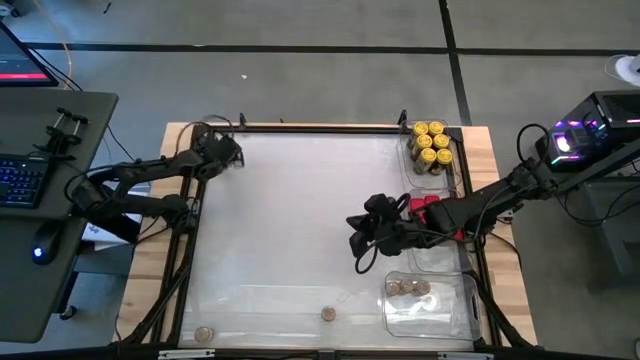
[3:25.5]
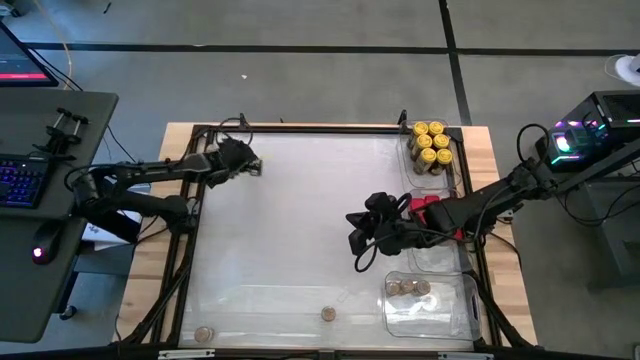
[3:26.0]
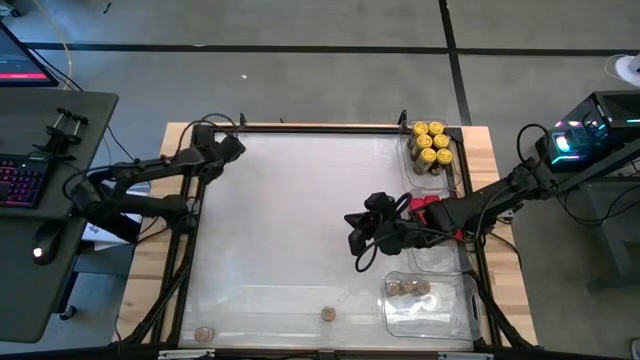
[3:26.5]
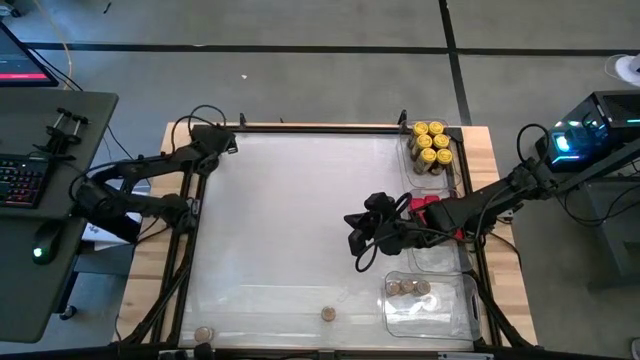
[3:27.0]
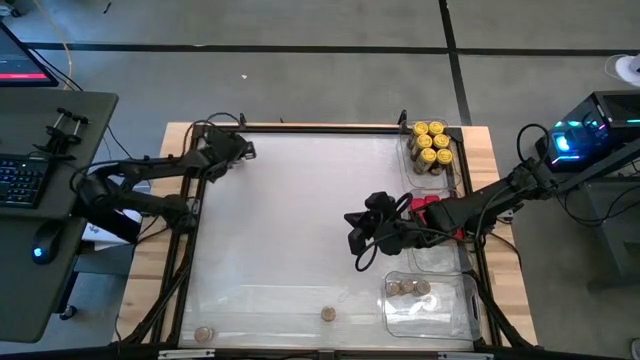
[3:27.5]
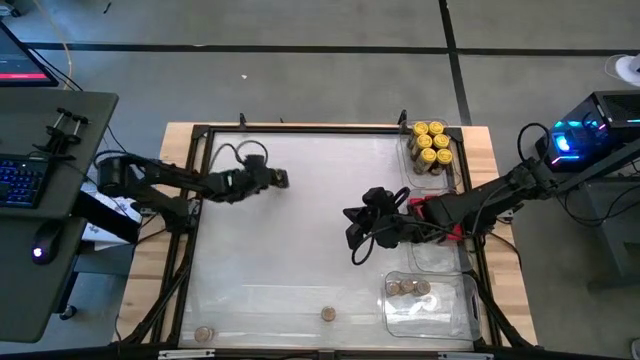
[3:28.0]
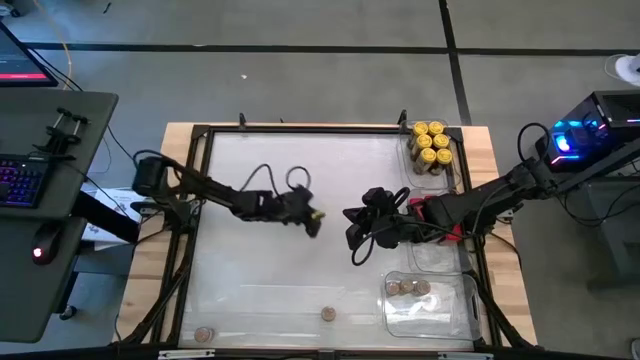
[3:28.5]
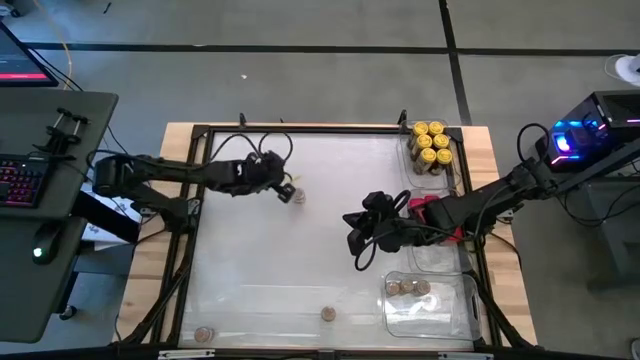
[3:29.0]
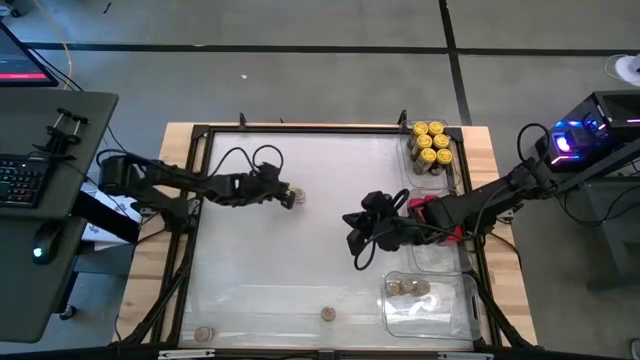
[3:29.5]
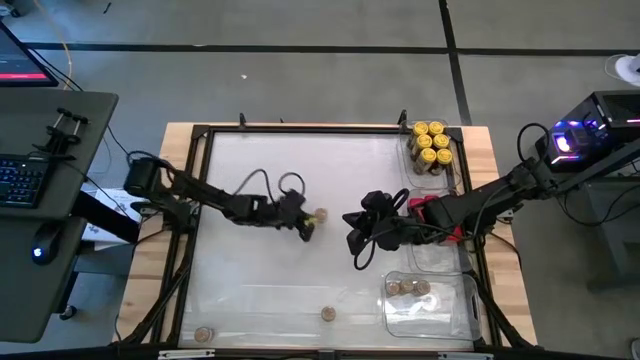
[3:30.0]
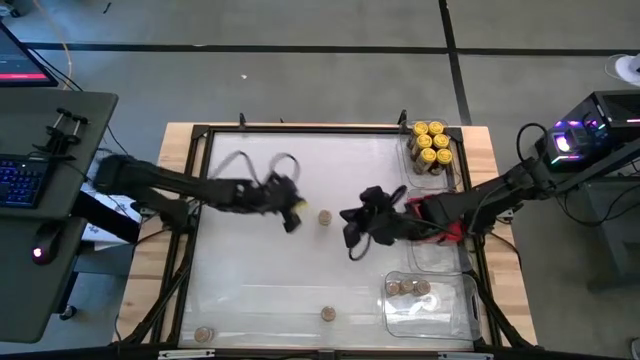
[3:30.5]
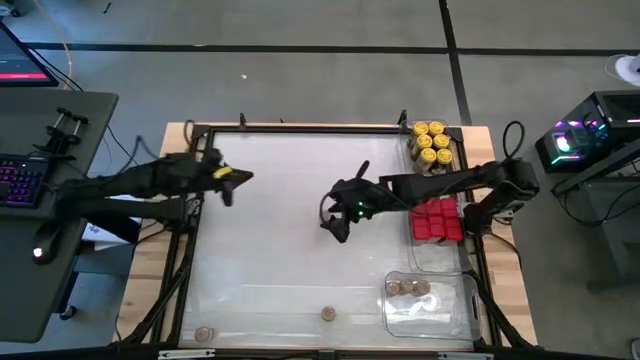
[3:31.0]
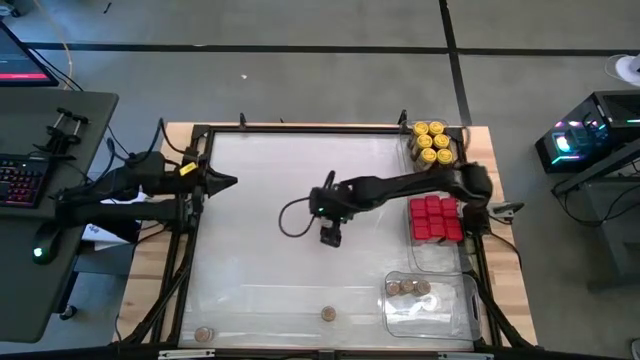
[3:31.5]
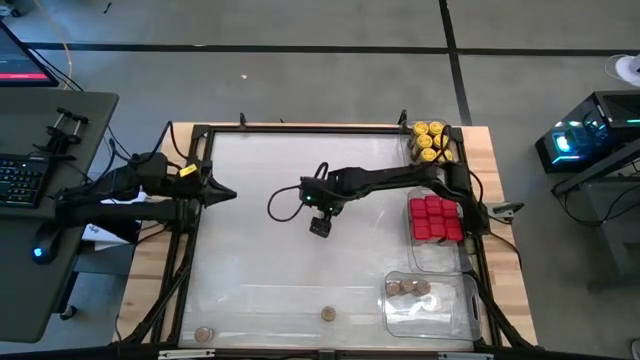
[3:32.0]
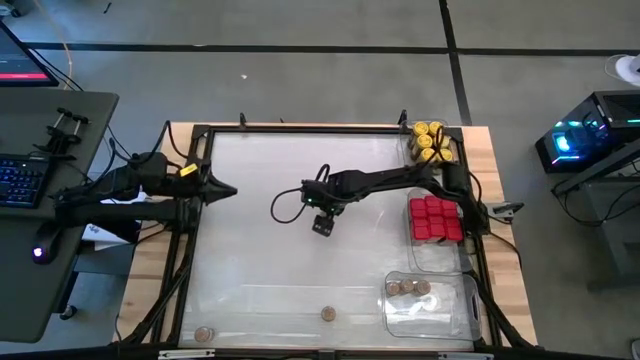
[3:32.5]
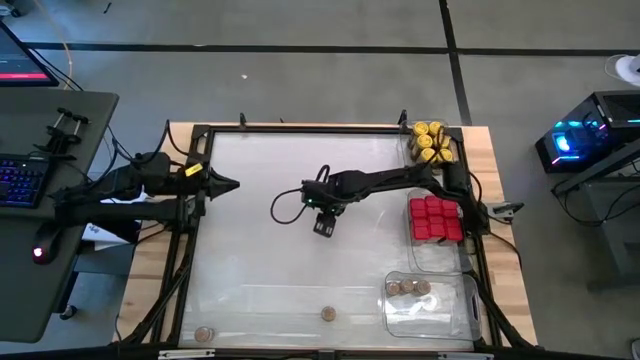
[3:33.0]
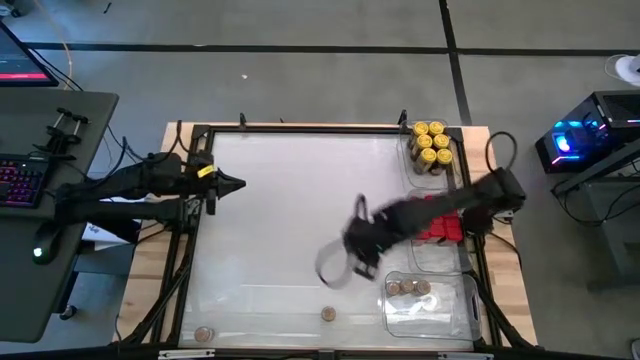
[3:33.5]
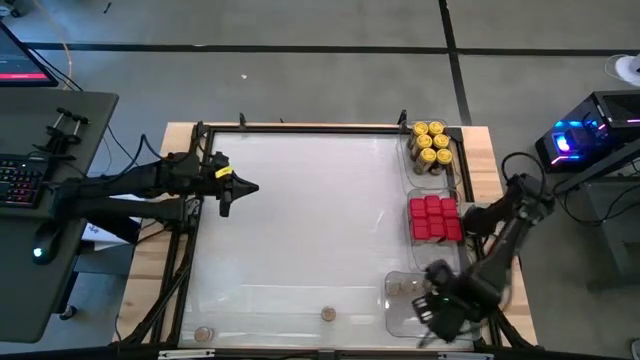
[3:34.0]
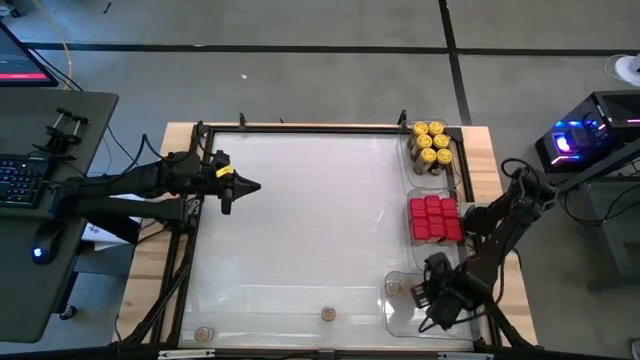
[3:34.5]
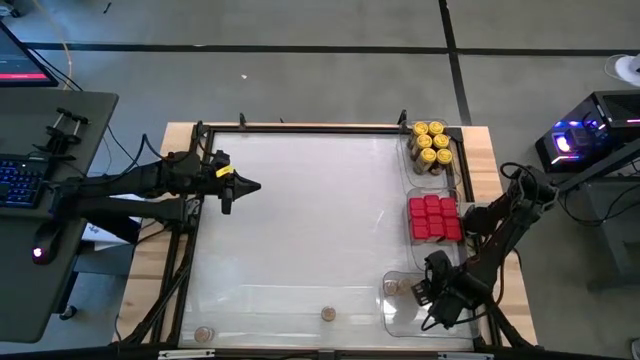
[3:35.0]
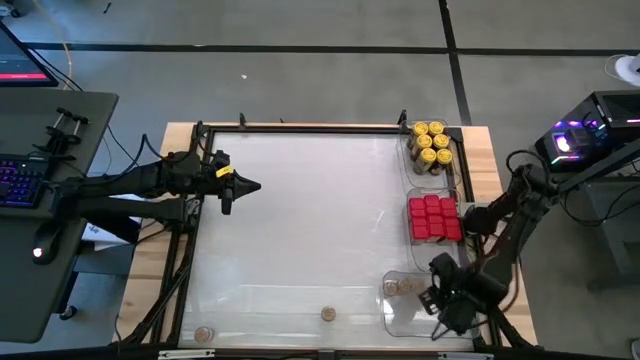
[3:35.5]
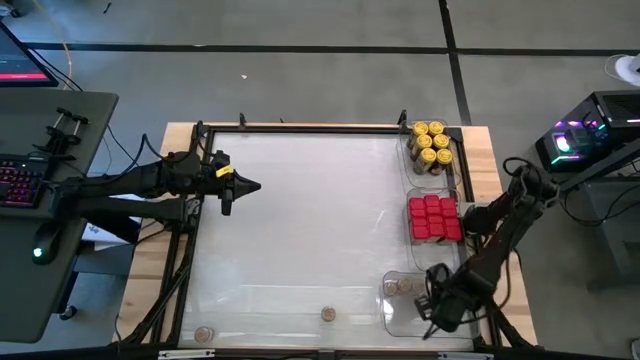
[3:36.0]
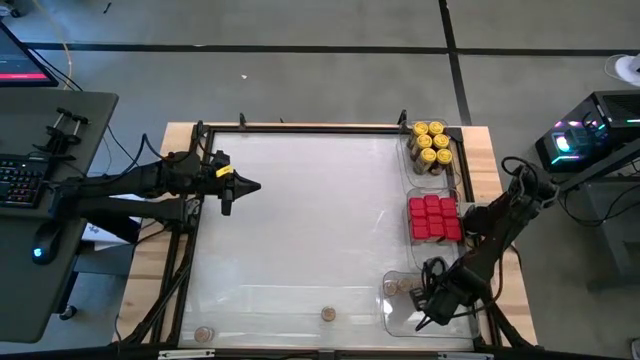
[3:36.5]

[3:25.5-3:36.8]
Task: Sort spices by type
Put the brown seasoning bottle into the bottom transparent bin

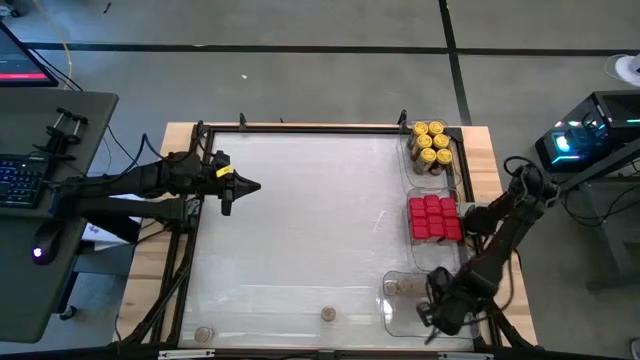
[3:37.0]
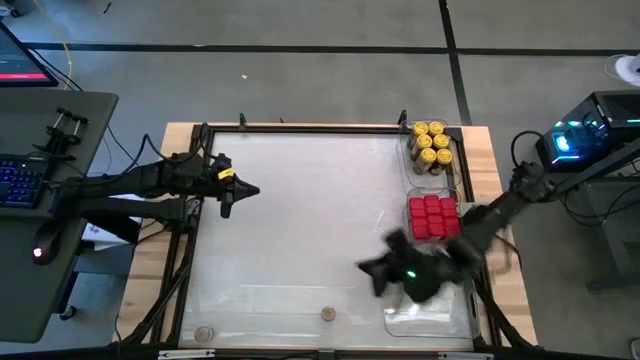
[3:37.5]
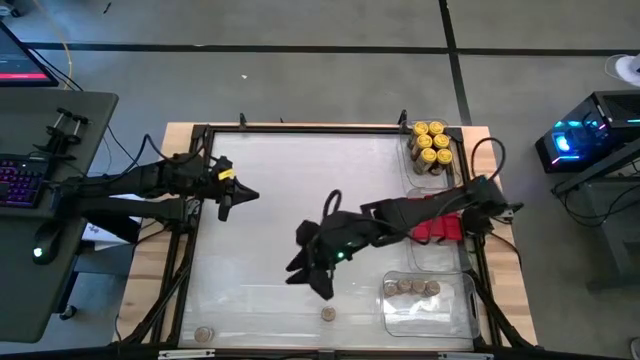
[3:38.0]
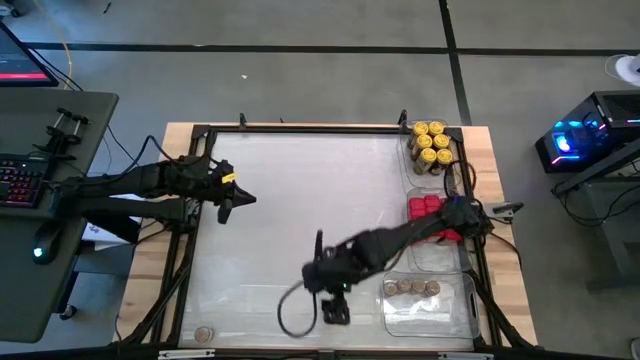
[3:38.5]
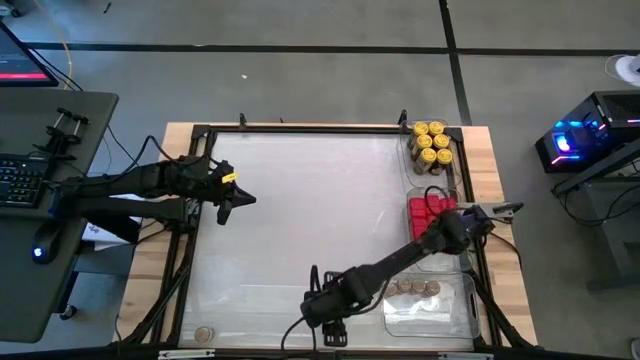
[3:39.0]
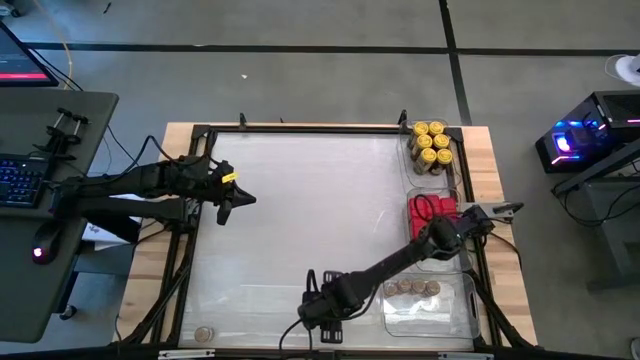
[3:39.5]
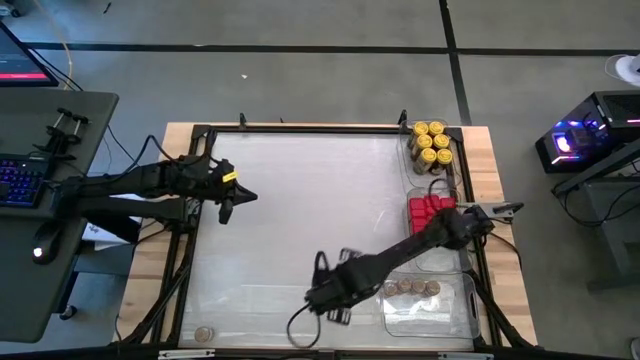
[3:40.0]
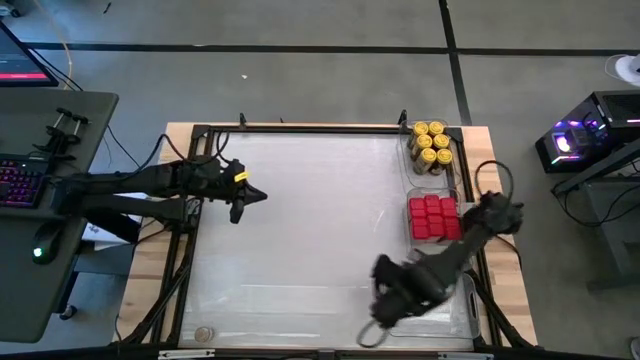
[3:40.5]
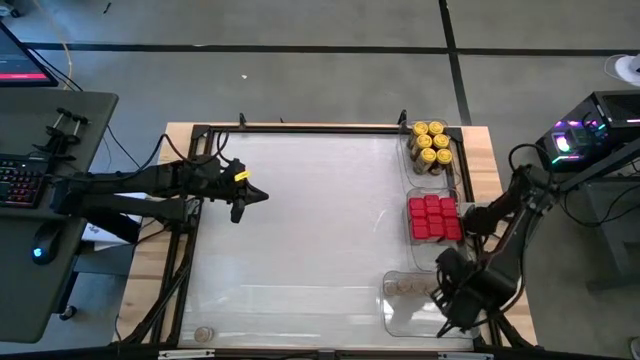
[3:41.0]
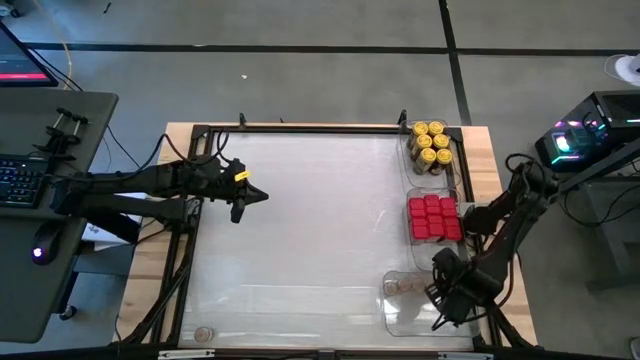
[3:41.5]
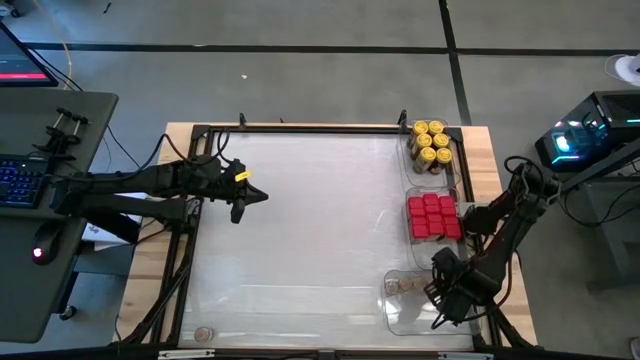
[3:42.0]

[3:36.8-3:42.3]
Put the brown seasoning bottle into the bottom transparent bin

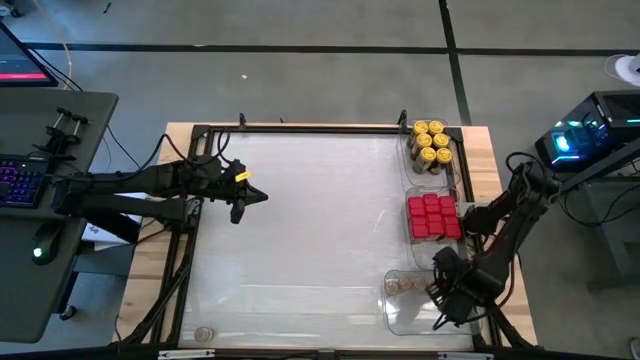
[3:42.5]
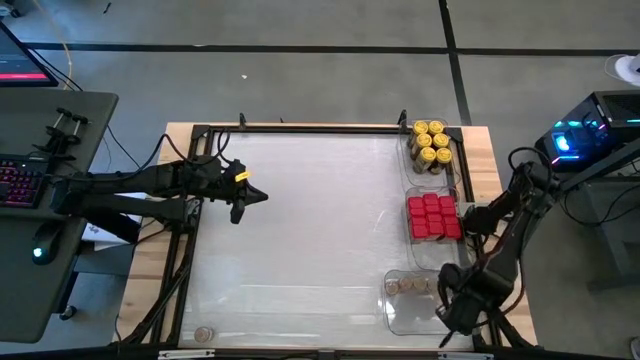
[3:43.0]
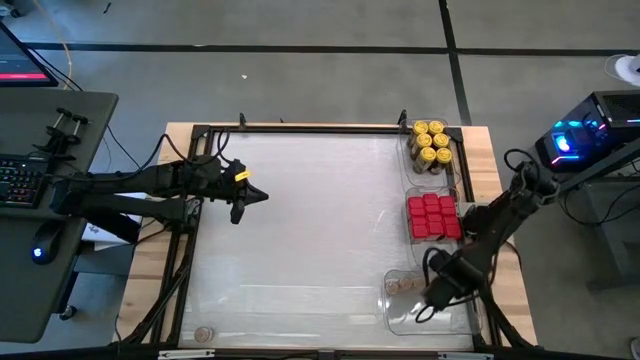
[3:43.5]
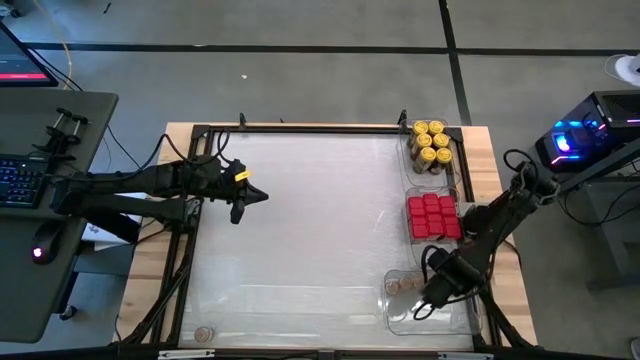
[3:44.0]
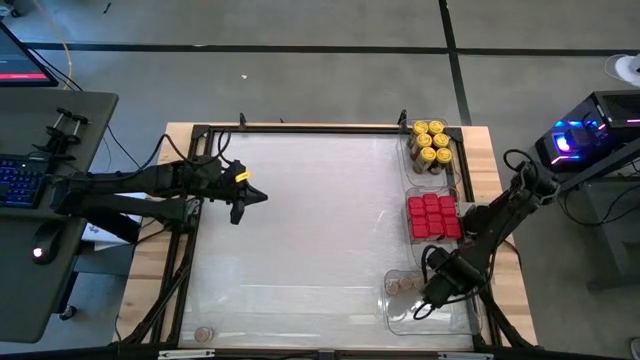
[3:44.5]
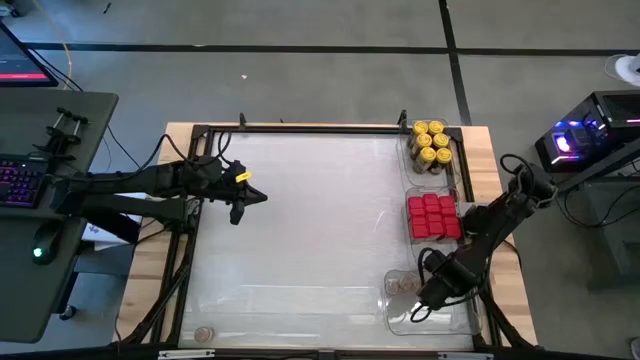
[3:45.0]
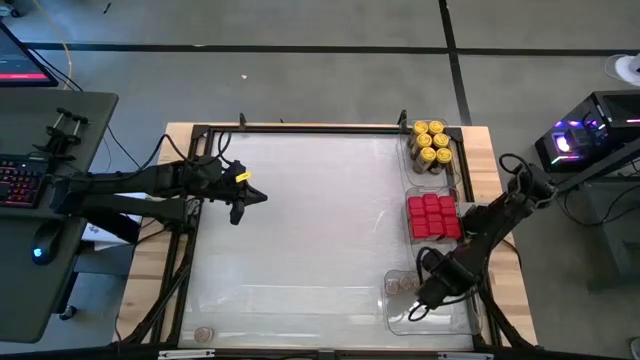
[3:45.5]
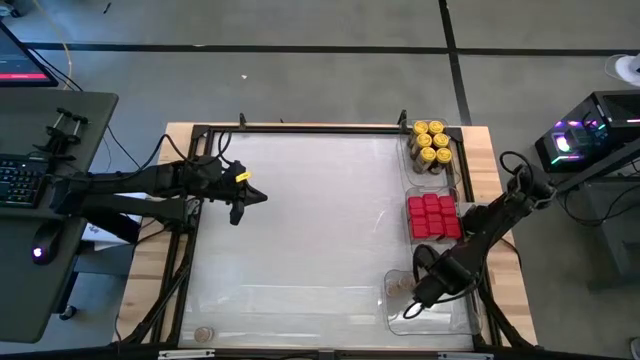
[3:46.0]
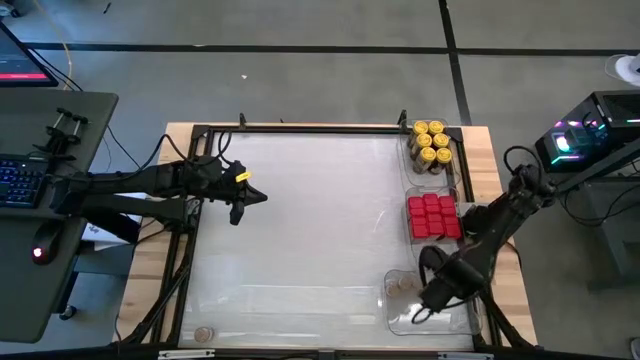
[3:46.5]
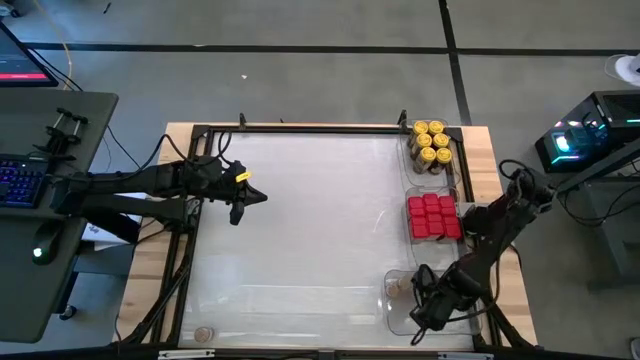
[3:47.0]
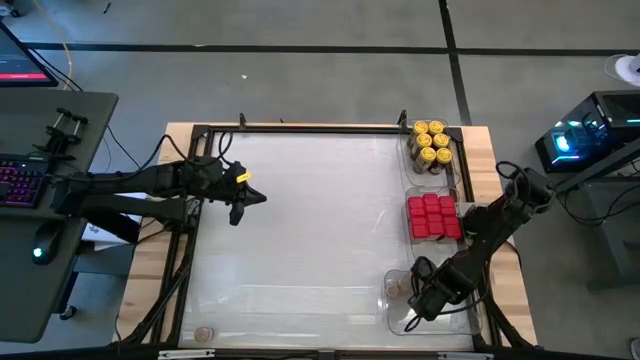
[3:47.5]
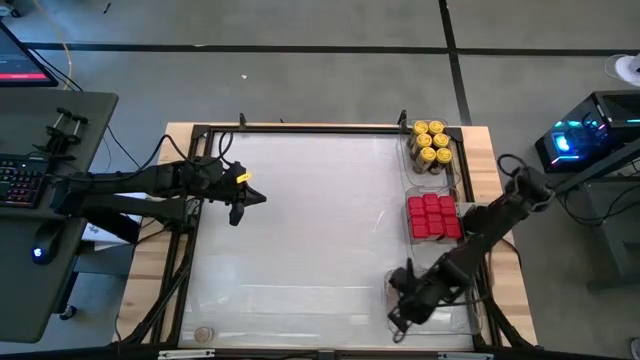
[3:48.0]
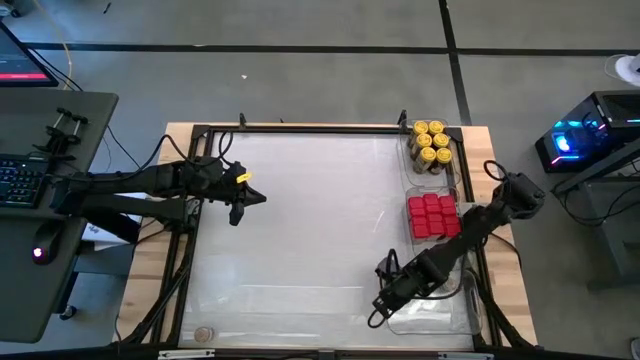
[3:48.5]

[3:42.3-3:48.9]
Adjust the brown seasoning bottles in the bottom transparent bin
